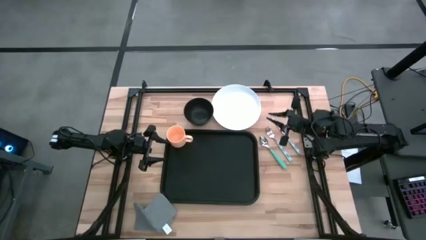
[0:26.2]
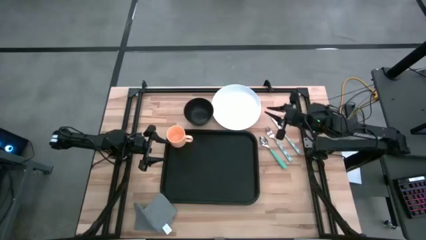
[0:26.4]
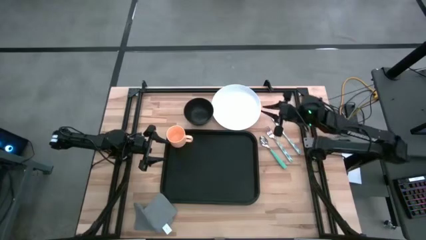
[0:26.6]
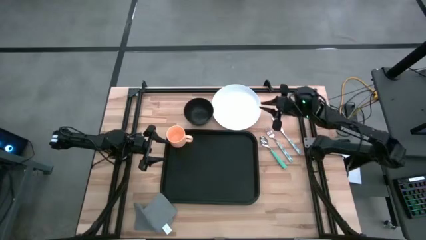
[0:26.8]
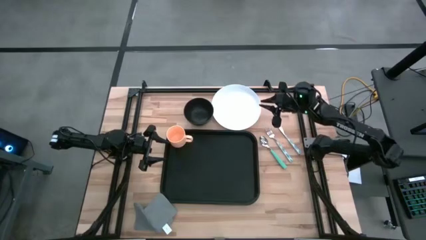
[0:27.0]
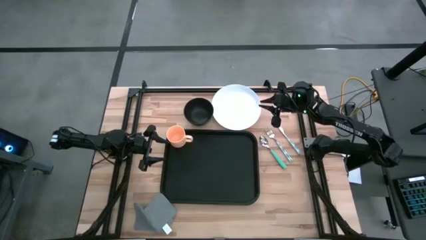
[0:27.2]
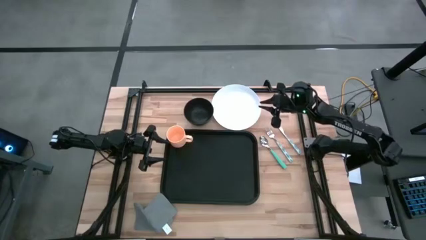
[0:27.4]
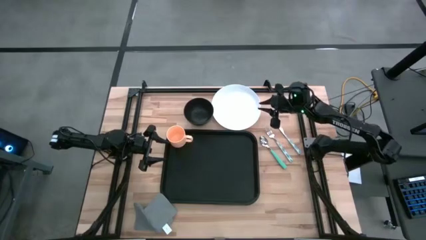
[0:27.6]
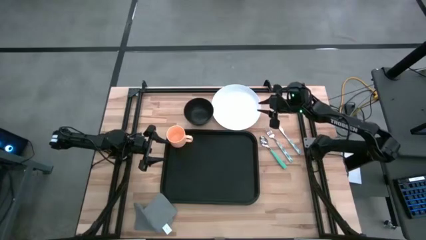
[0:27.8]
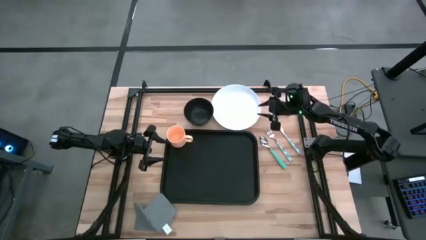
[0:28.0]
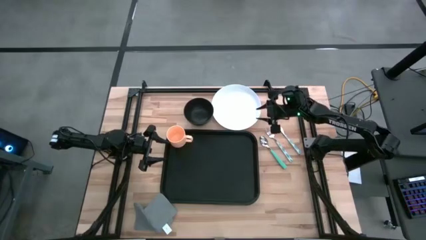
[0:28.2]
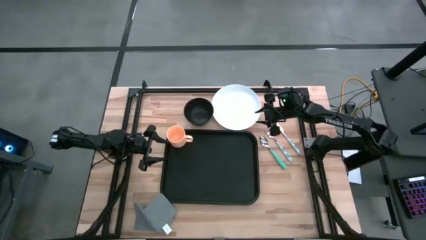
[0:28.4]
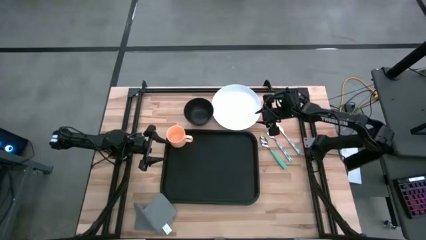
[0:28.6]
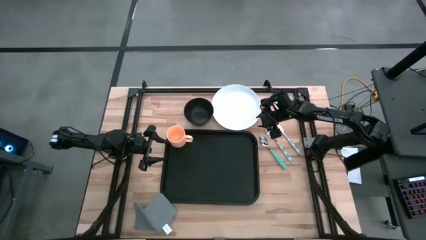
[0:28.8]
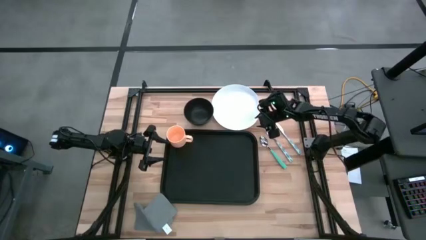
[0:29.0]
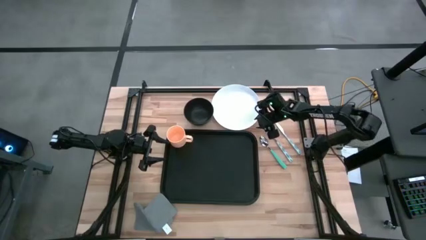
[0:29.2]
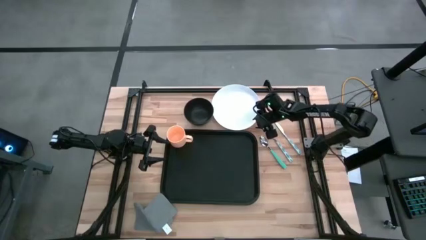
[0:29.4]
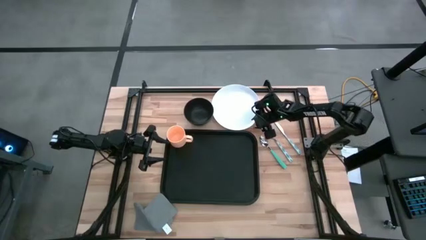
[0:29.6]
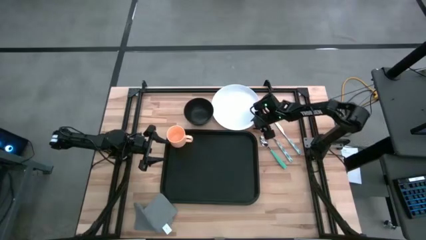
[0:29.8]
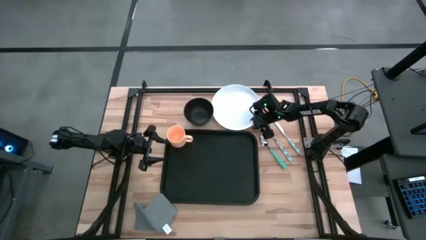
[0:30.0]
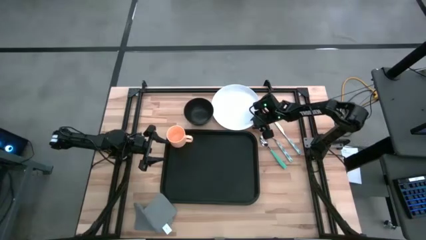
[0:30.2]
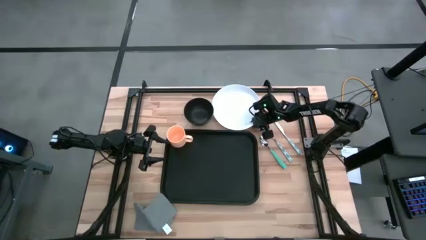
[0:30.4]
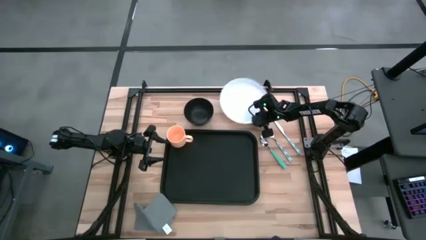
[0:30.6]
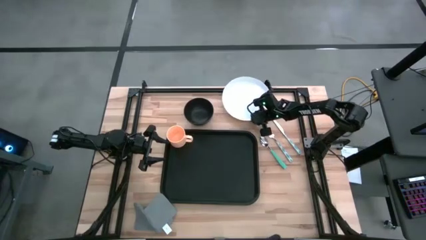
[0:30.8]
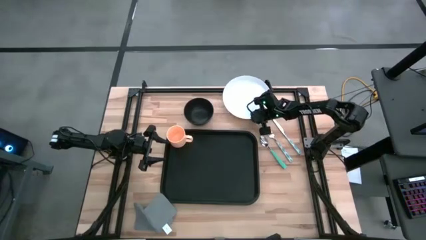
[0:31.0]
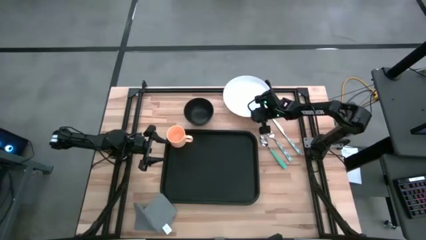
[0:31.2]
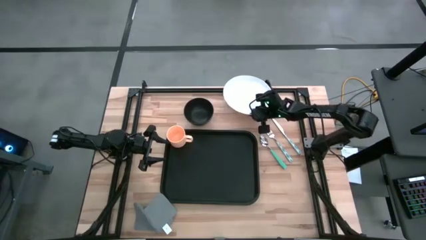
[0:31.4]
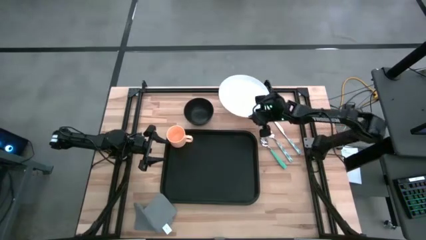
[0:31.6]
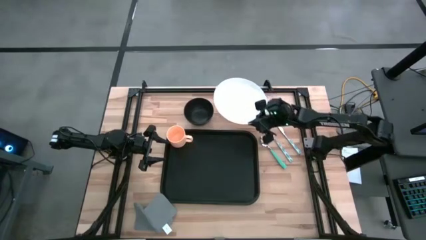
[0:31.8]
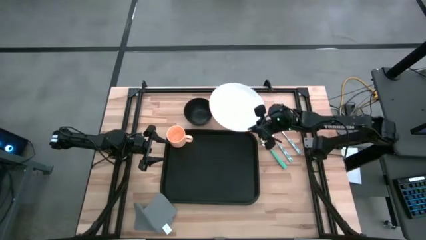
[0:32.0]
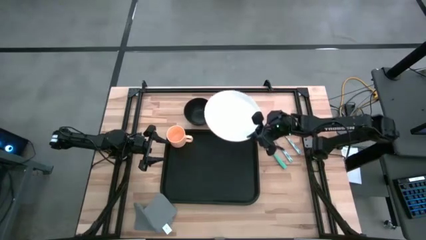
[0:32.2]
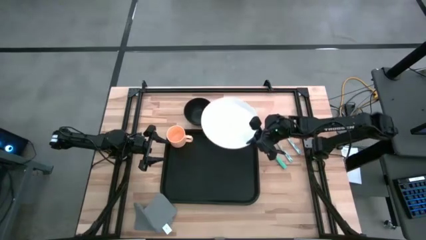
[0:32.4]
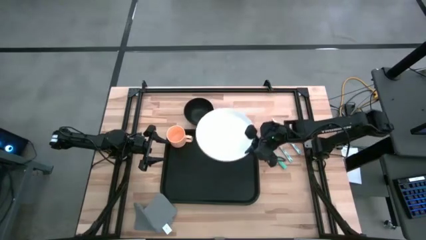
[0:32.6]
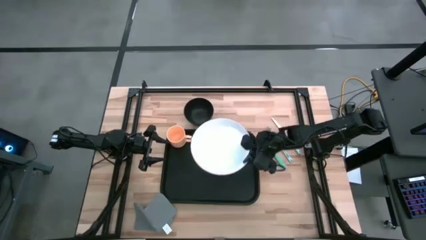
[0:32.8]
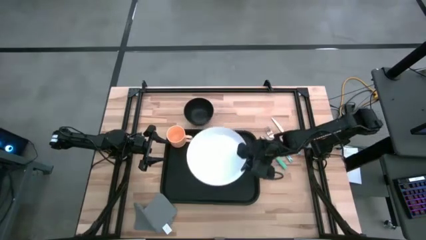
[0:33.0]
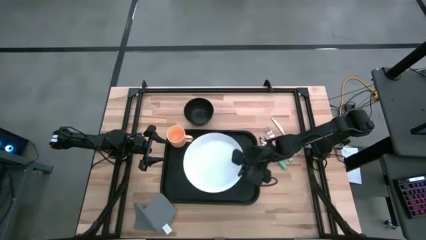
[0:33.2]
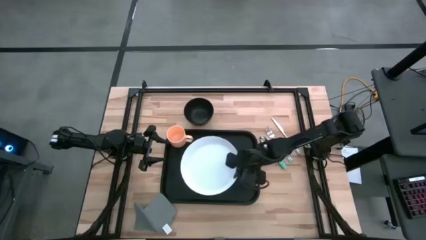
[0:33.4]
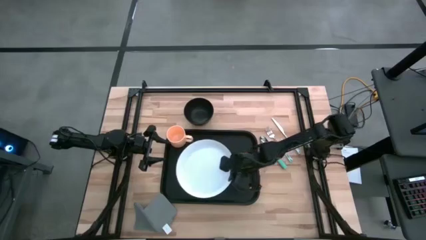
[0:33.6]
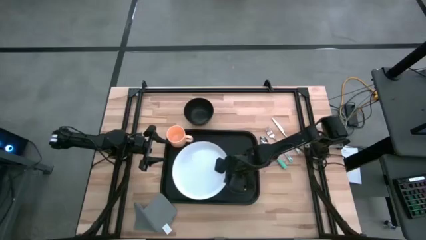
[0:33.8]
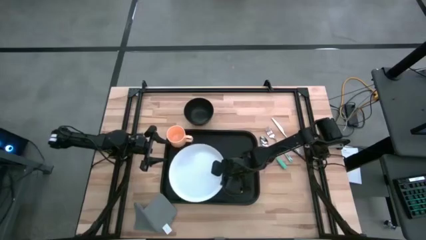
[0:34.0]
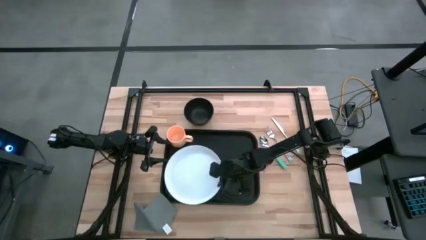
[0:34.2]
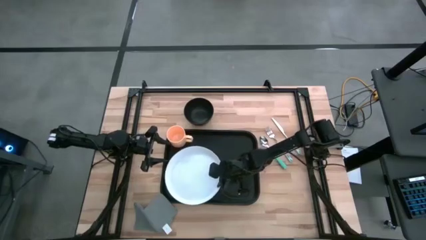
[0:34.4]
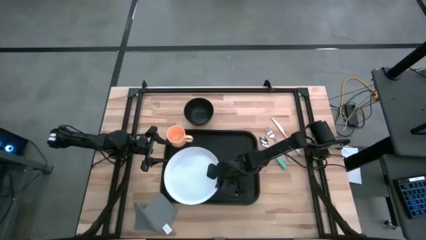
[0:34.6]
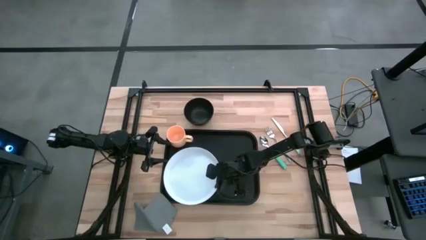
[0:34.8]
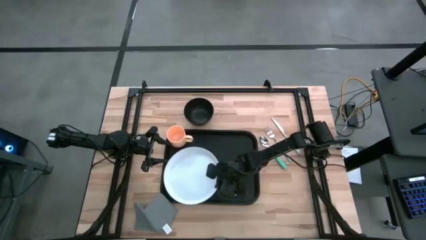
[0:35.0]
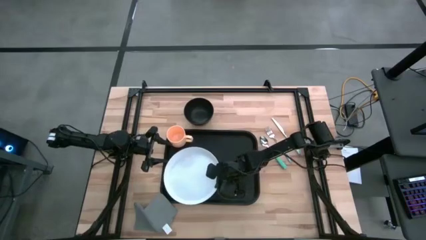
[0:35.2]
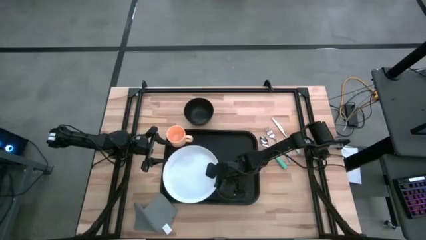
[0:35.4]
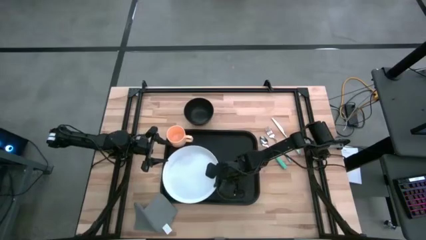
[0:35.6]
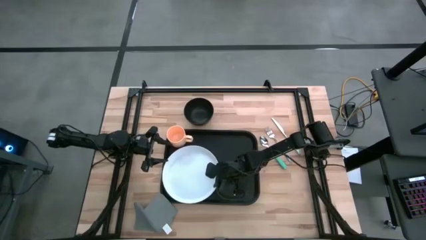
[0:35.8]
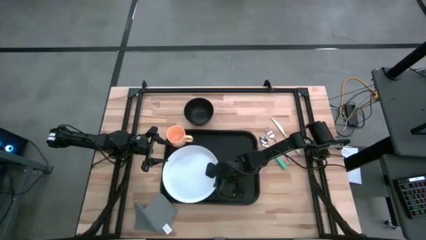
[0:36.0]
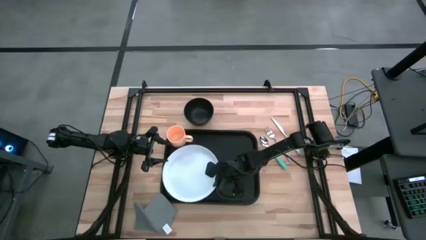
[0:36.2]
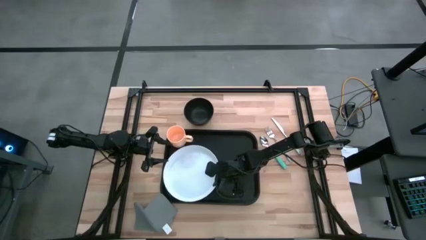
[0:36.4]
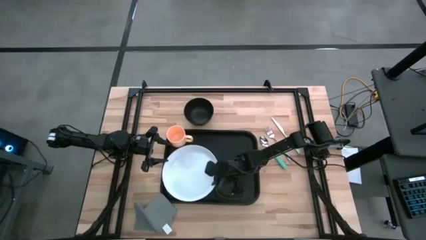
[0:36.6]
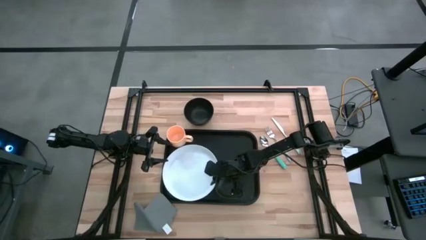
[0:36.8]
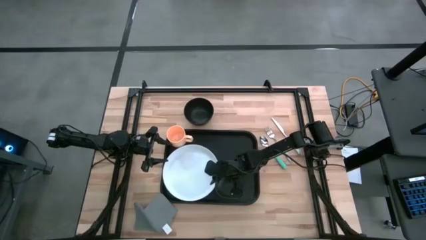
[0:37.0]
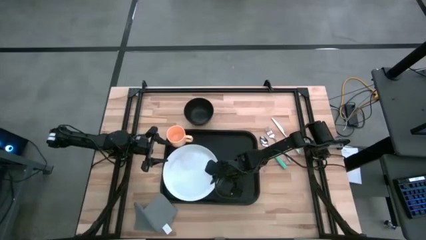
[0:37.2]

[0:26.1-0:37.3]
Task: Set up tray
Put the white plate on the black serving tray
